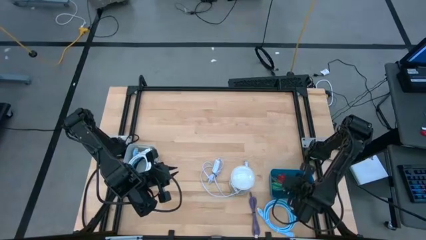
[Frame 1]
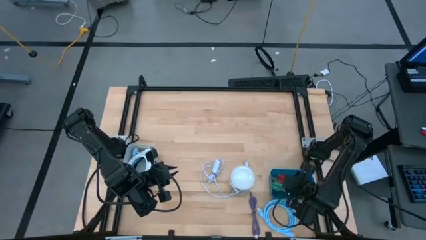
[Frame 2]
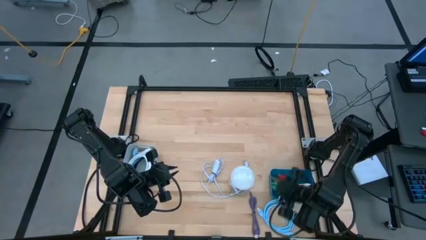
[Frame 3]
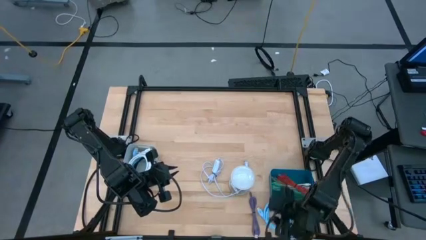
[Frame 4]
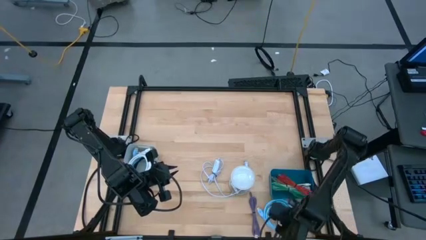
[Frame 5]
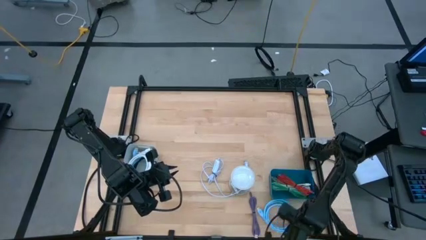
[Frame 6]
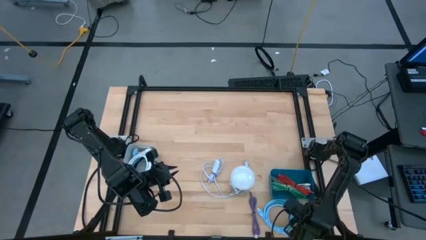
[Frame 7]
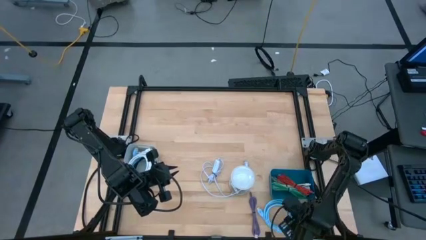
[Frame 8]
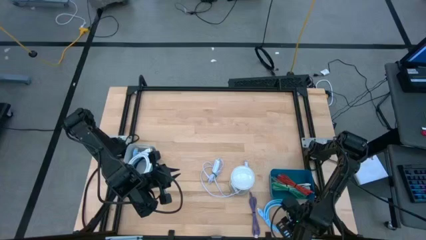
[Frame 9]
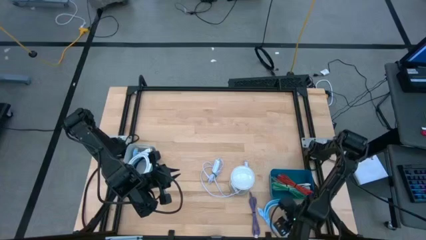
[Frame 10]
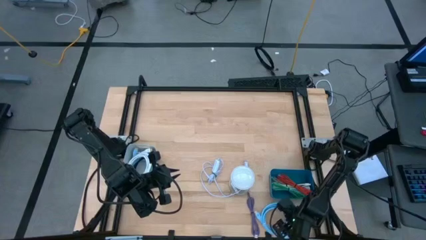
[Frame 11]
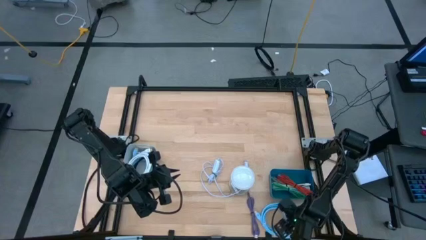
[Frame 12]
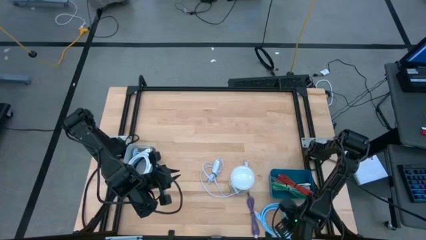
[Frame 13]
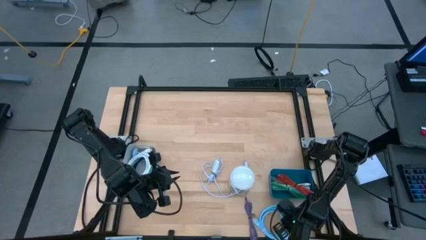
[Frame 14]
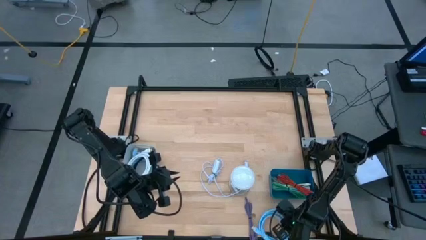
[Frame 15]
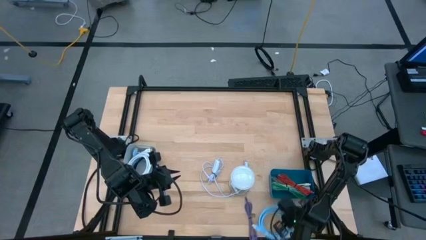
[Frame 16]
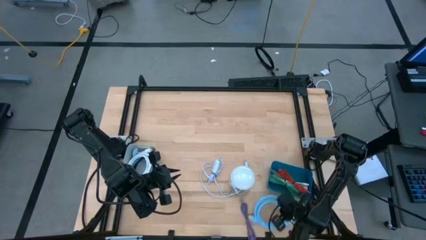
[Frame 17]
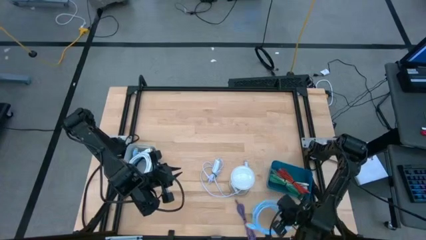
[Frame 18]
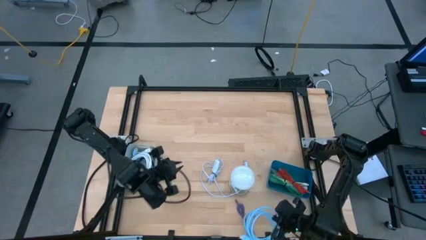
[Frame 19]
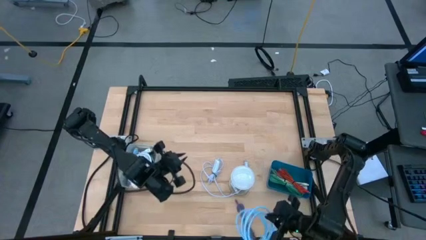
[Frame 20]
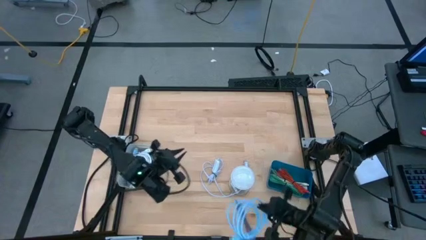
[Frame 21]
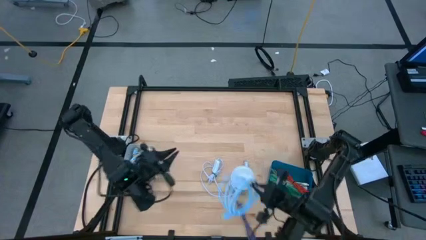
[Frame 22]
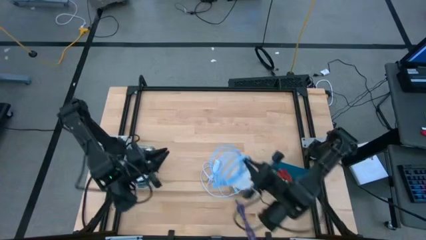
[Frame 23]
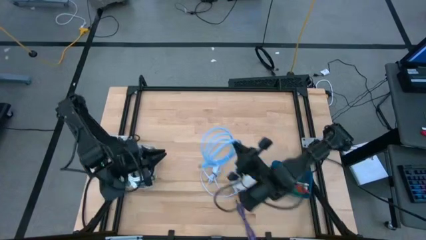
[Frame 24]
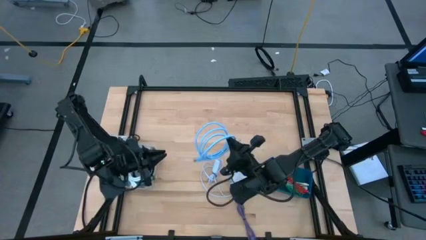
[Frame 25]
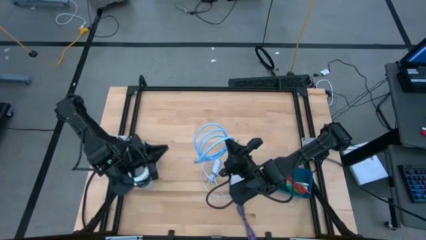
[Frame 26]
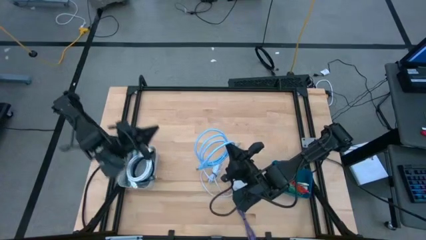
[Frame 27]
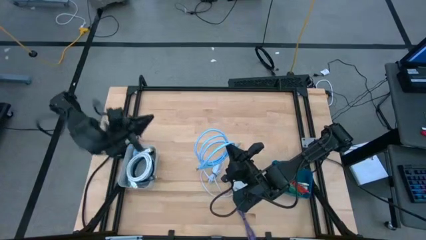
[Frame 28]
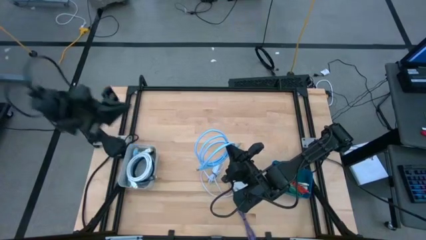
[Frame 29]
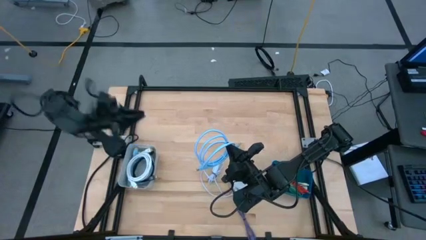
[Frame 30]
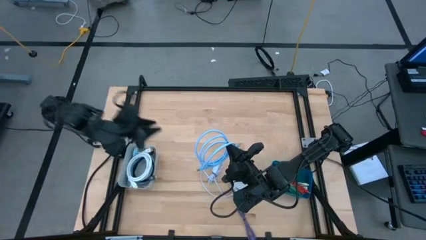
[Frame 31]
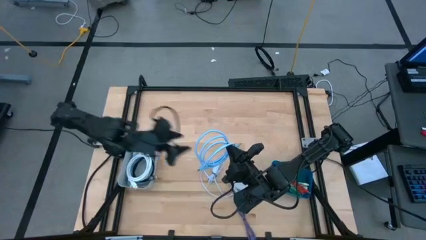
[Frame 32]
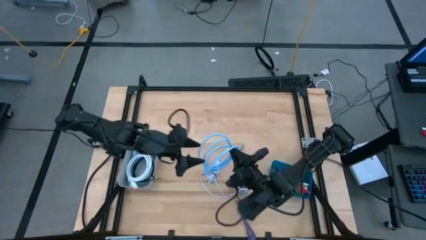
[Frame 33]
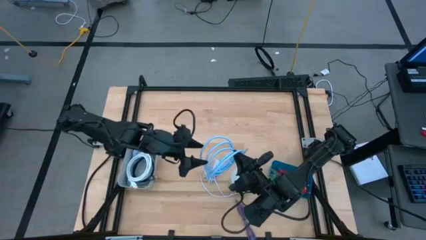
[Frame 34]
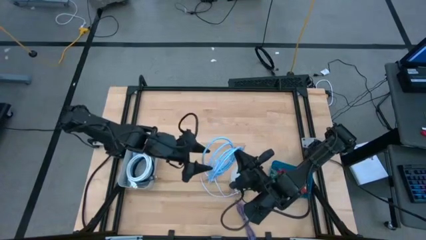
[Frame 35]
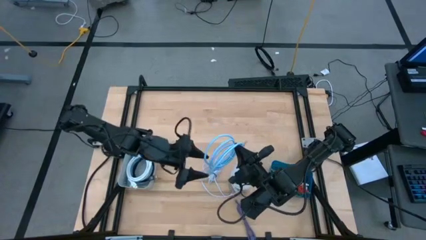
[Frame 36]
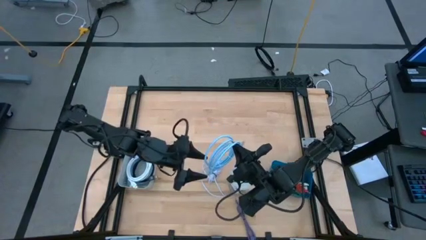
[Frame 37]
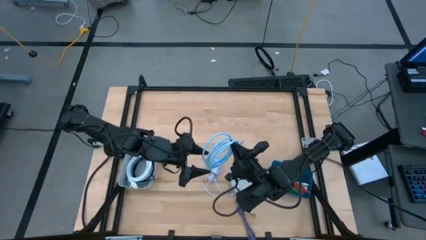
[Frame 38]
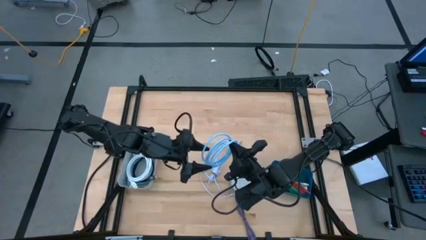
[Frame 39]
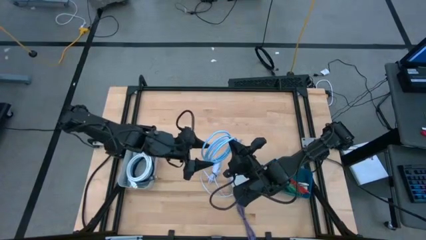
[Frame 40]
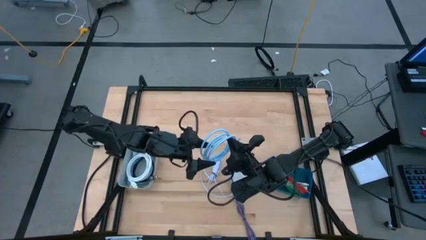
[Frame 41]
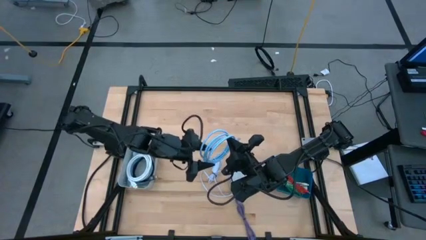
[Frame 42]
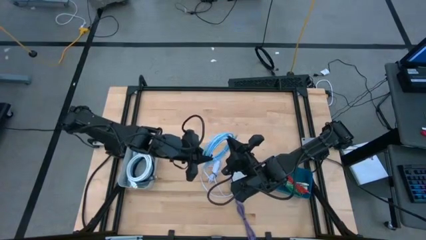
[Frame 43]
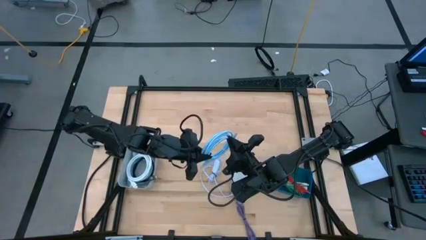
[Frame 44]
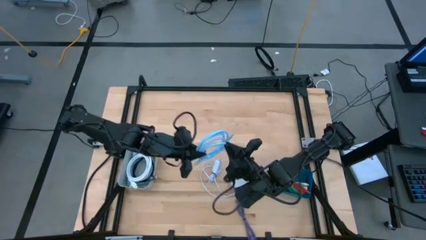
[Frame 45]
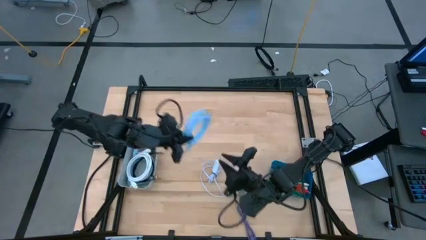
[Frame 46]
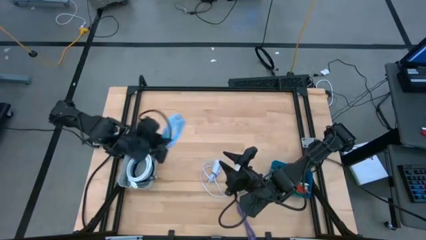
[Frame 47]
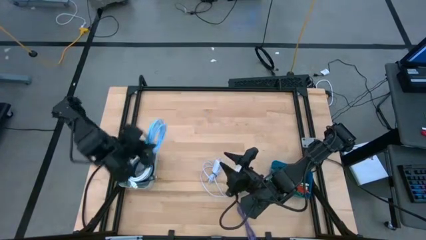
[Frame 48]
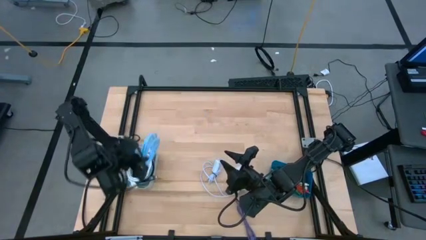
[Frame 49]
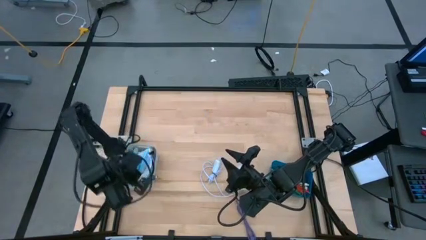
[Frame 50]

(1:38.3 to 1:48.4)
Task: Pick & Place USB Port
Put the light blue HDMI cable into the gray bin

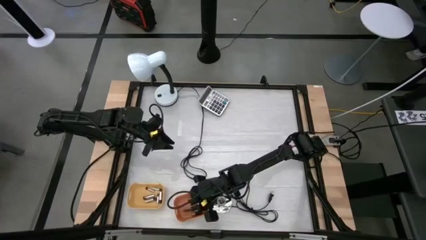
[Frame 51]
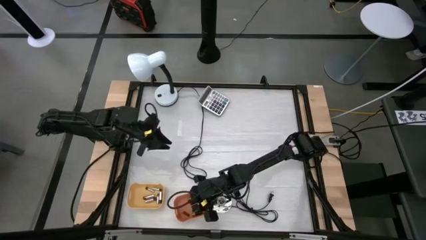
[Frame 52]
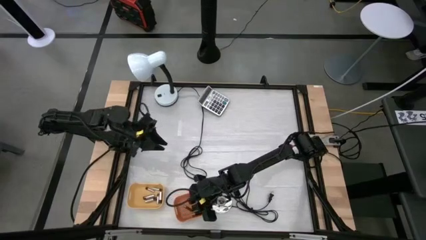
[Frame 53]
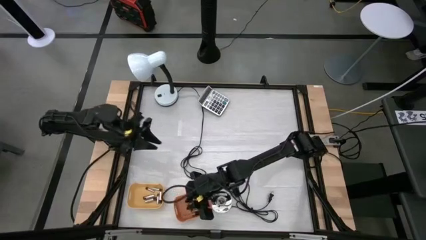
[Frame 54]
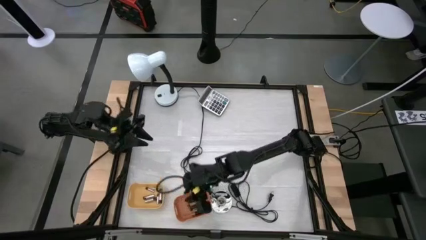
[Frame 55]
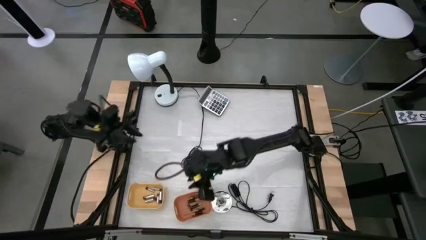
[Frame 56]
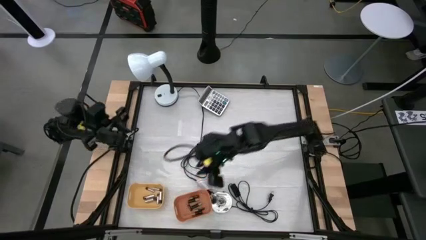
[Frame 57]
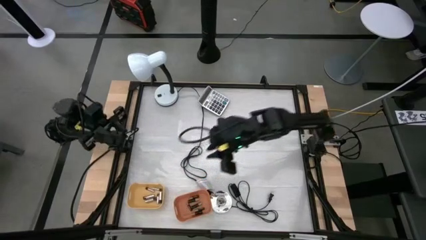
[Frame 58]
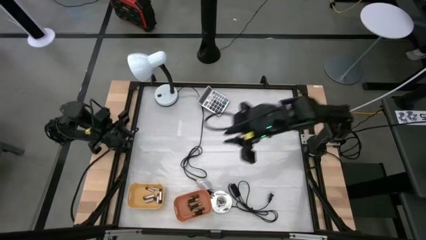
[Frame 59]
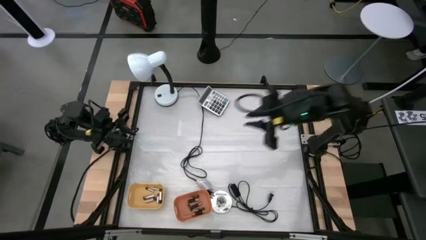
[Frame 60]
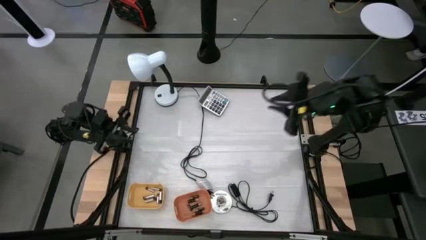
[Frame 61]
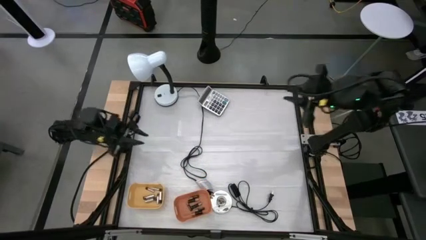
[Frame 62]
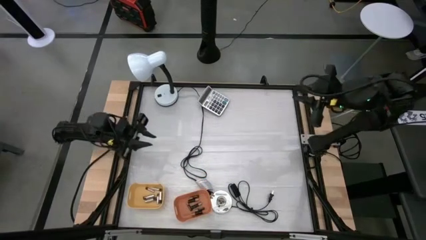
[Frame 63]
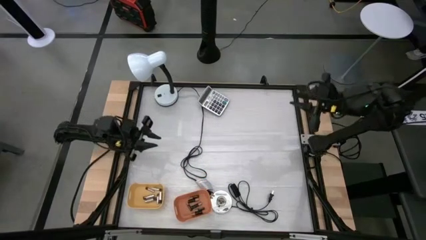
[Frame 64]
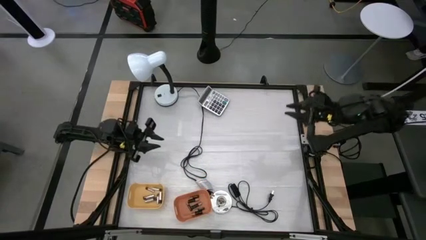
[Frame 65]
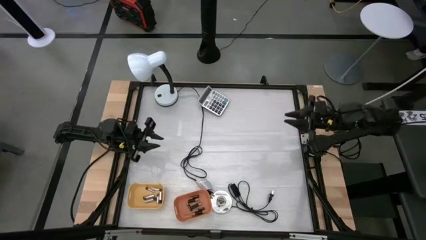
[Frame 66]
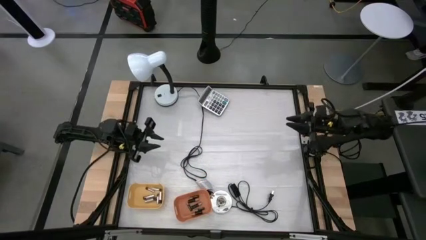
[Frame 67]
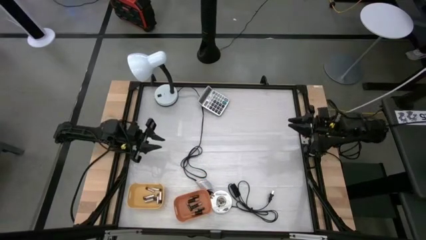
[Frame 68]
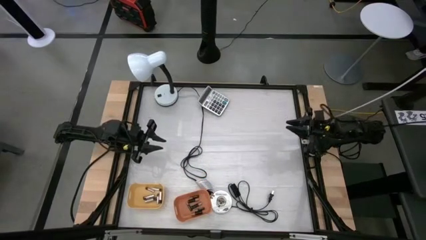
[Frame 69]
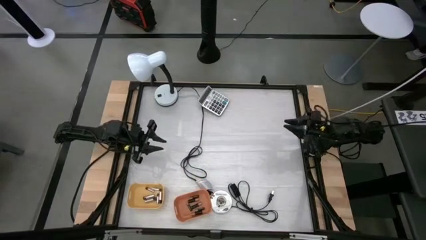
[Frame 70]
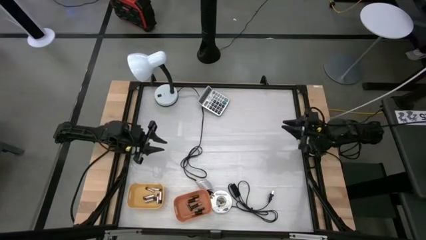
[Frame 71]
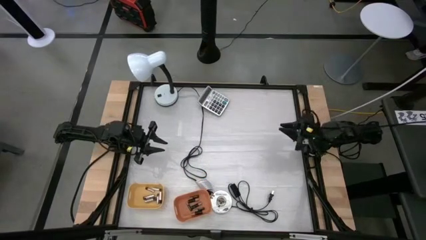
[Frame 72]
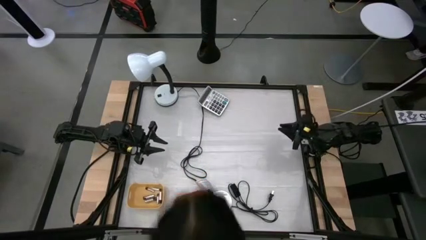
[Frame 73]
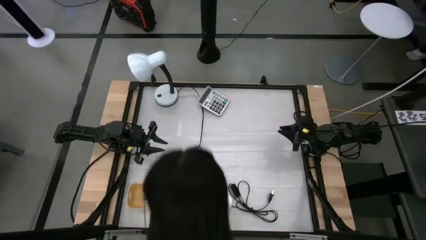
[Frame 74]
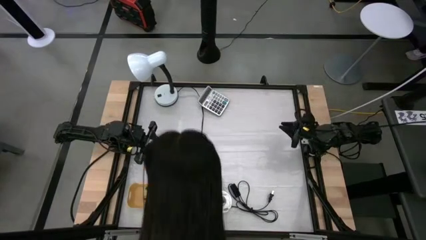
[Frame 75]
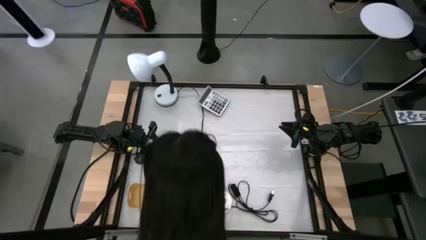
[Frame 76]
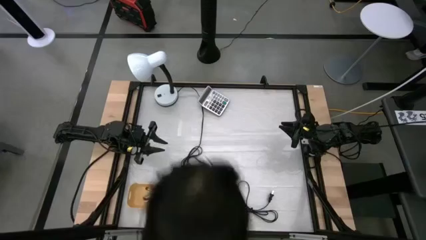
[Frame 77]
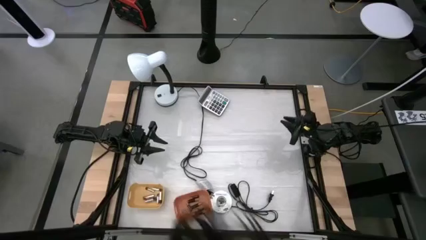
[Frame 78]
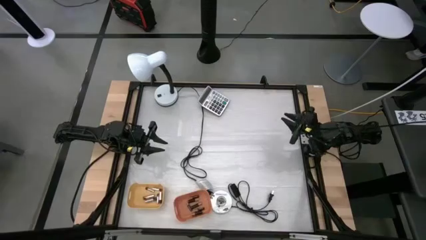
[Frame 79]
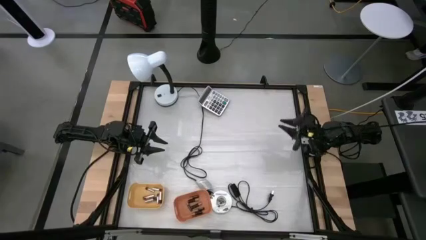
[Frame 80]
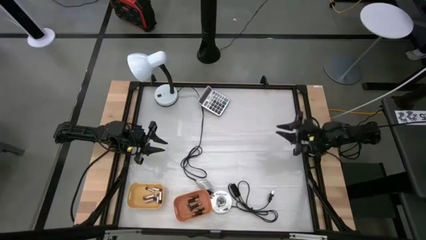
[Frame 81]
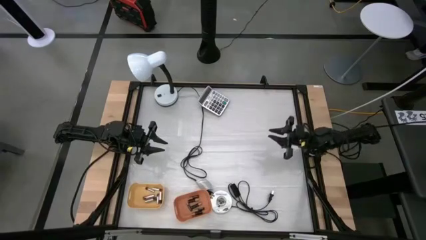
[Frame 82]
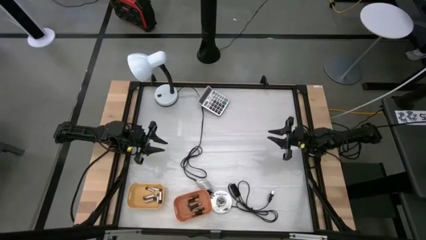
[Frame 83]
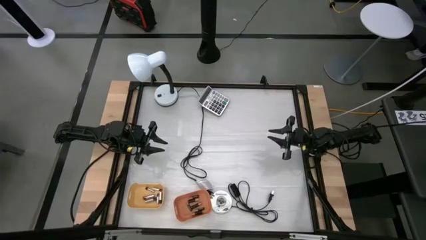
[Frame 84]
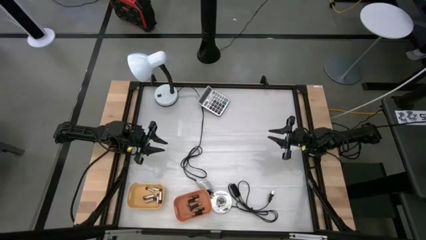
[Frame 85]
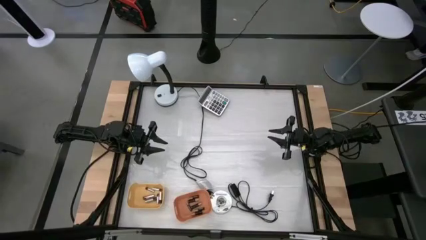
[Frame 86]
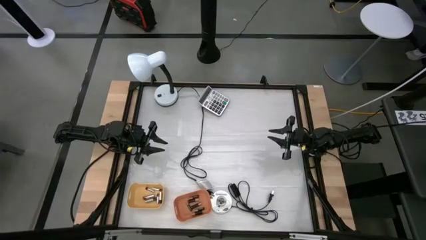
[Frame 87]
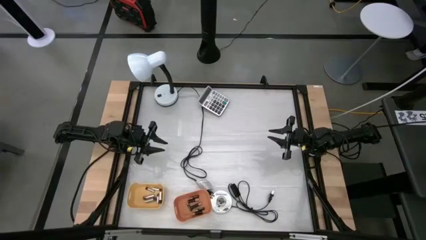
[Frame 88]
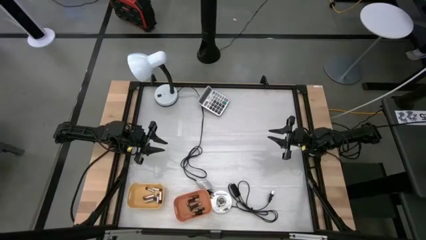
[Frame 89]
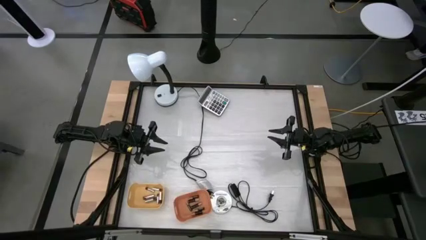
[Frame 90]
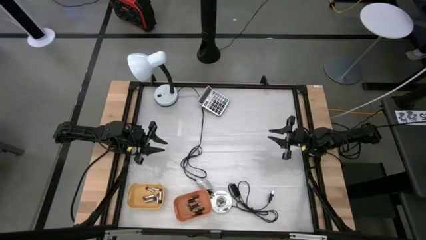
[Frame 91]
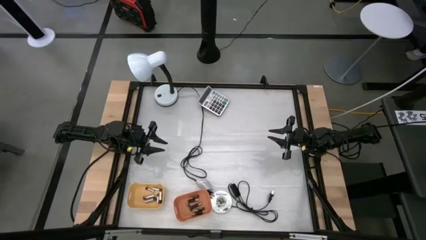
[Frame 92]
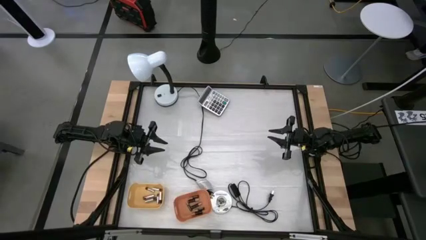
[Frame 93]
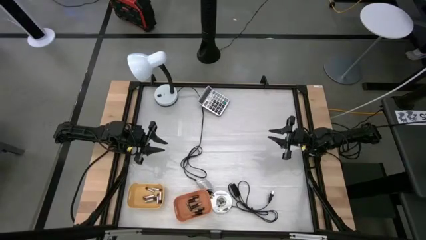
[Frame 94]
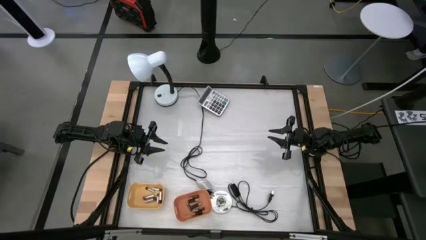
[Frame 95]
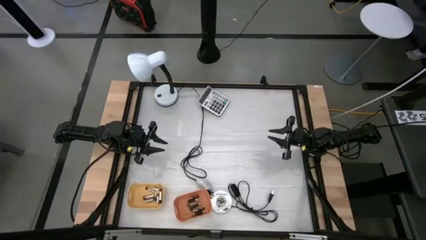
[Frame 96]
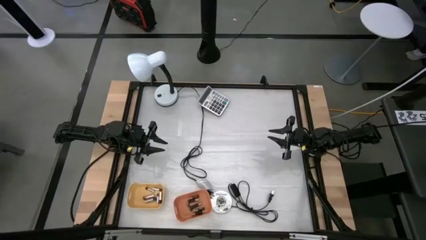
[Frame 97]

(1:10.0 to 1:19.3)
Task: Sort batteries
Return to Home Position
